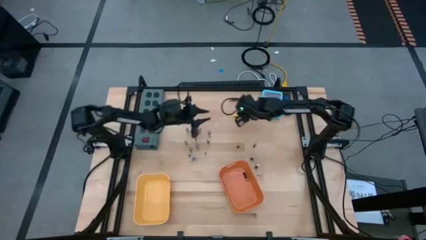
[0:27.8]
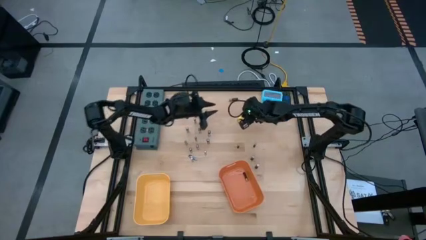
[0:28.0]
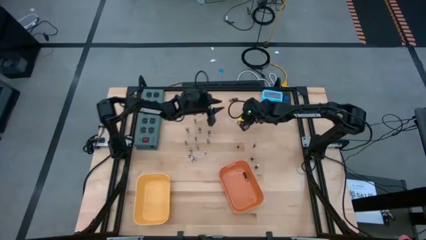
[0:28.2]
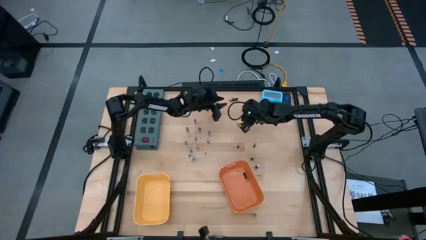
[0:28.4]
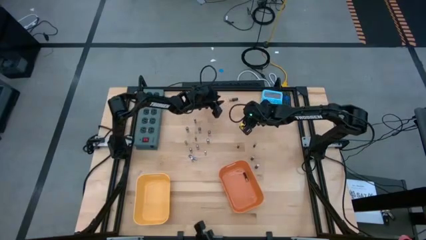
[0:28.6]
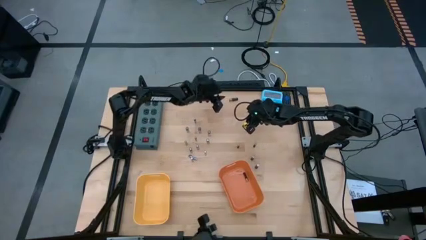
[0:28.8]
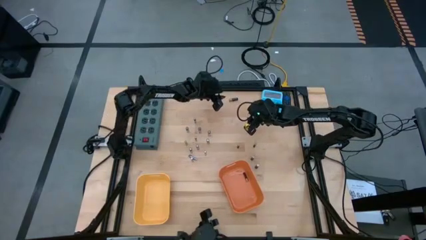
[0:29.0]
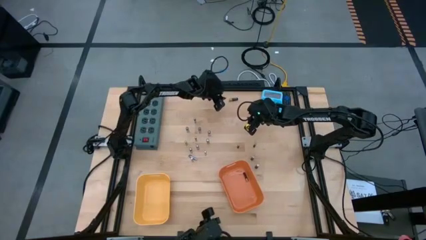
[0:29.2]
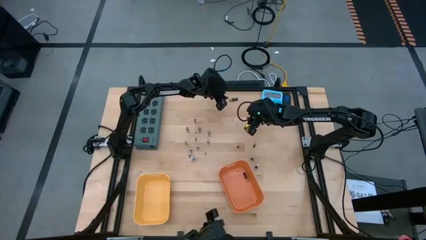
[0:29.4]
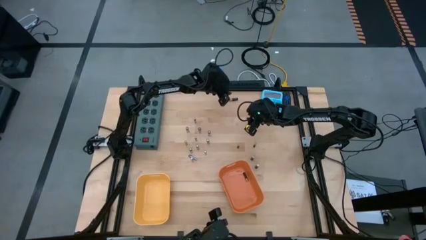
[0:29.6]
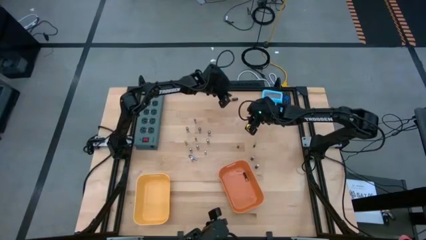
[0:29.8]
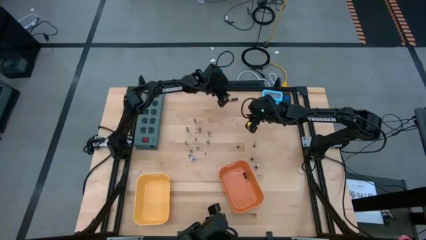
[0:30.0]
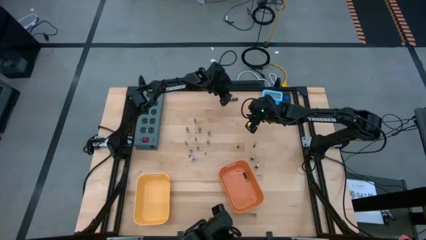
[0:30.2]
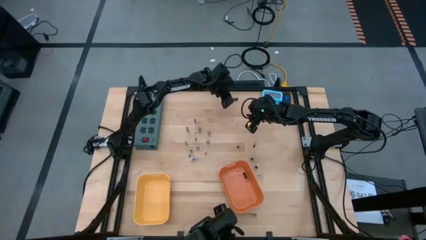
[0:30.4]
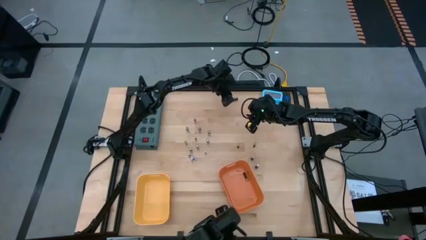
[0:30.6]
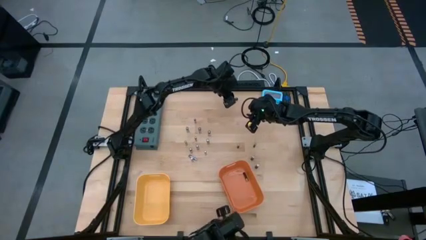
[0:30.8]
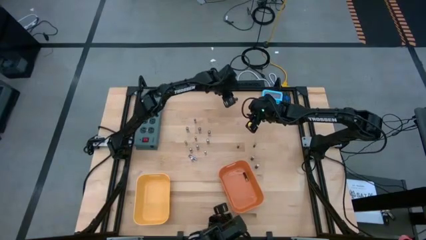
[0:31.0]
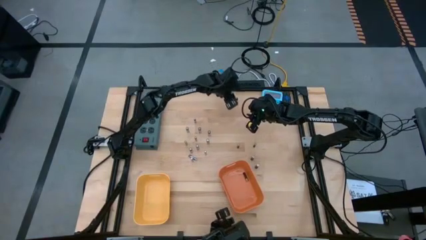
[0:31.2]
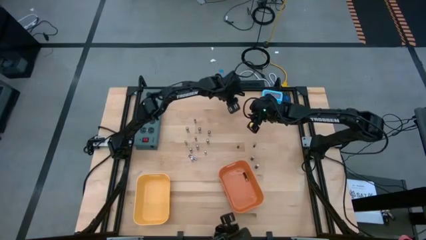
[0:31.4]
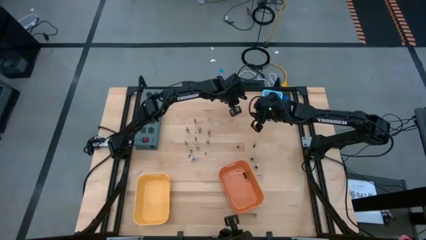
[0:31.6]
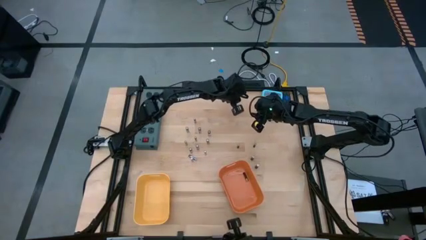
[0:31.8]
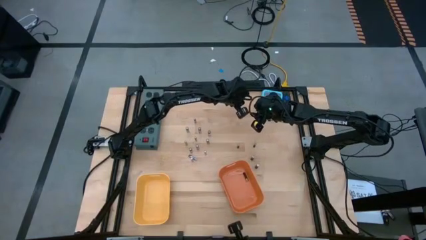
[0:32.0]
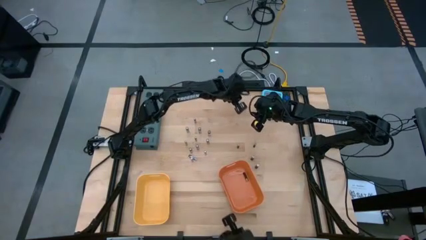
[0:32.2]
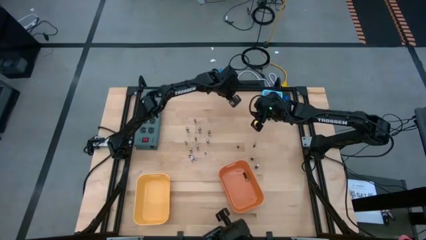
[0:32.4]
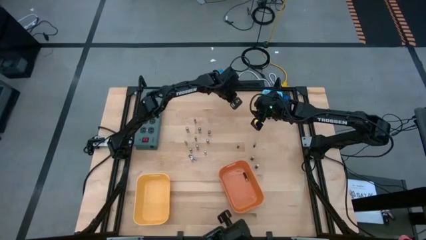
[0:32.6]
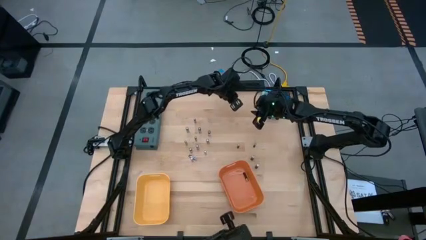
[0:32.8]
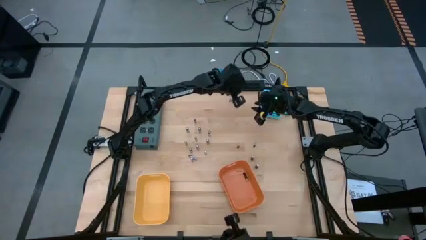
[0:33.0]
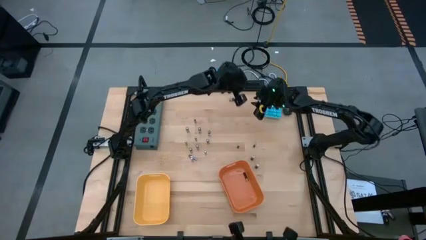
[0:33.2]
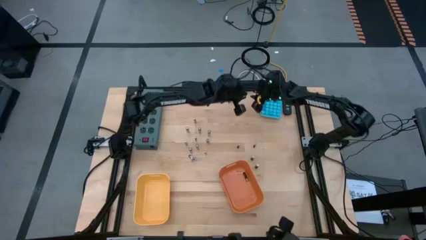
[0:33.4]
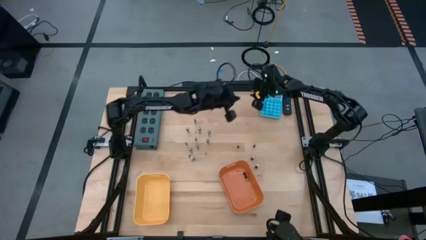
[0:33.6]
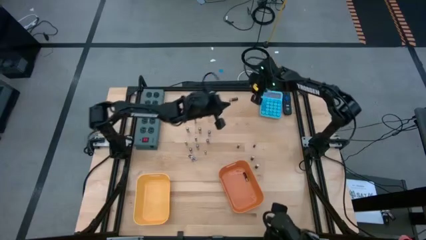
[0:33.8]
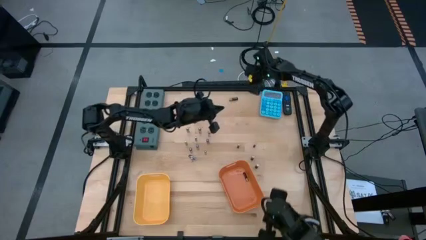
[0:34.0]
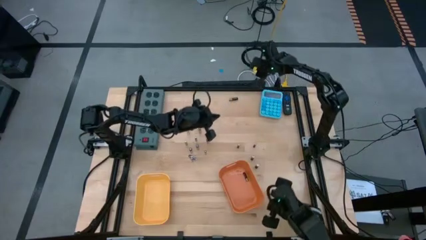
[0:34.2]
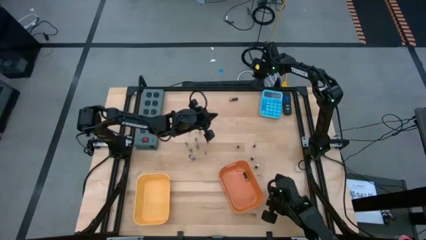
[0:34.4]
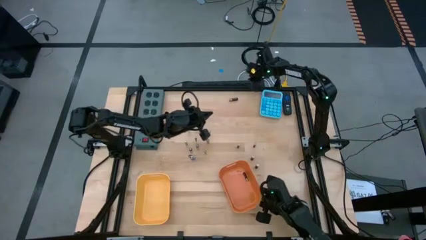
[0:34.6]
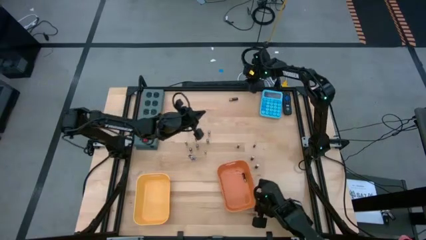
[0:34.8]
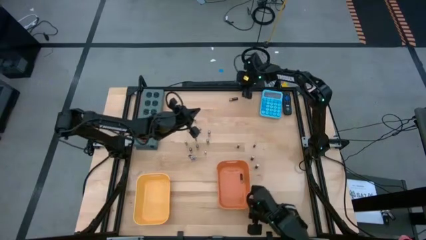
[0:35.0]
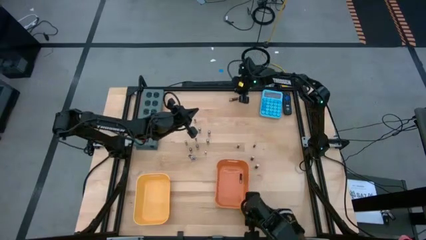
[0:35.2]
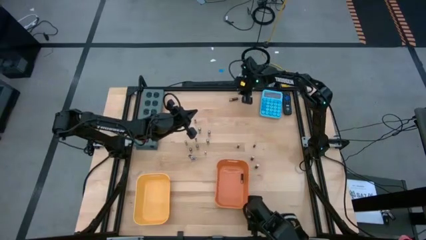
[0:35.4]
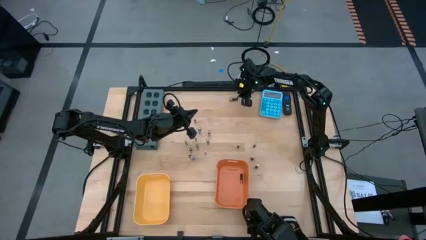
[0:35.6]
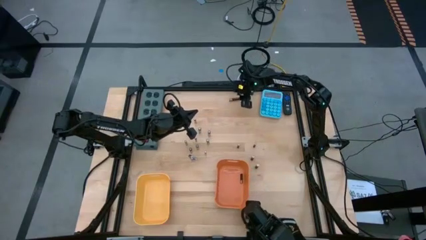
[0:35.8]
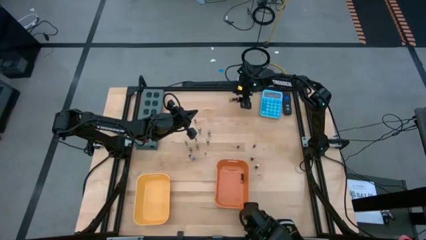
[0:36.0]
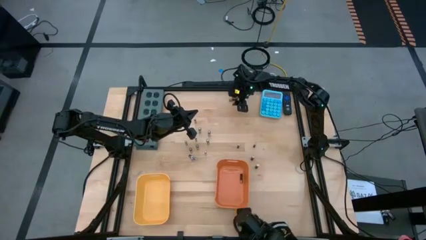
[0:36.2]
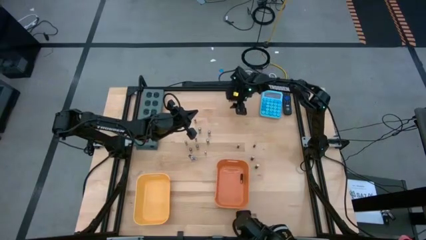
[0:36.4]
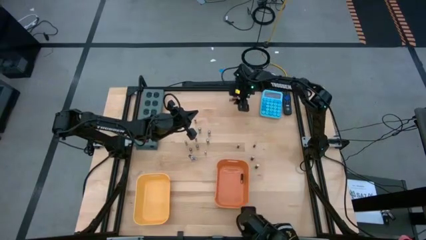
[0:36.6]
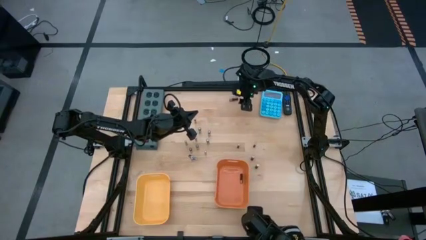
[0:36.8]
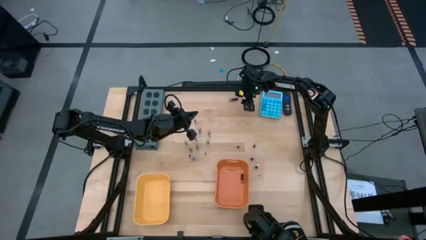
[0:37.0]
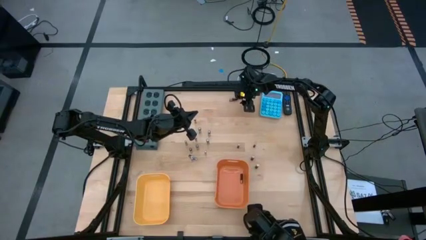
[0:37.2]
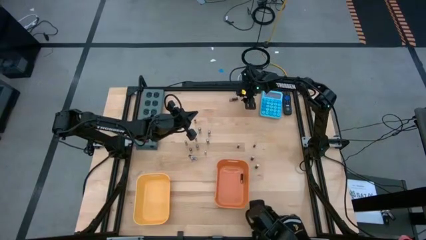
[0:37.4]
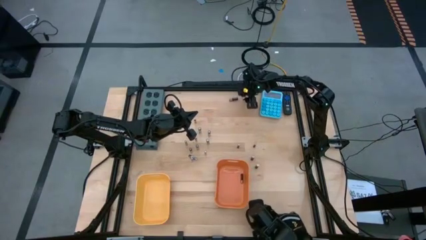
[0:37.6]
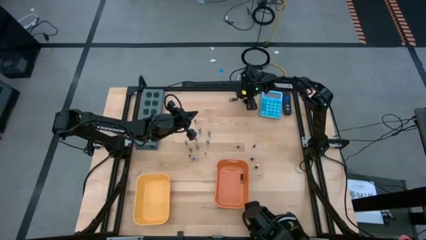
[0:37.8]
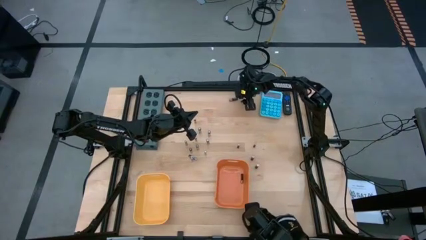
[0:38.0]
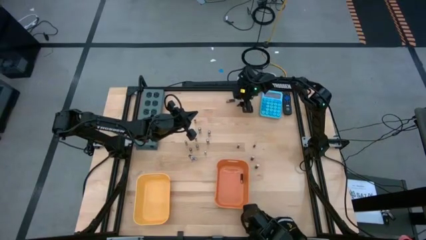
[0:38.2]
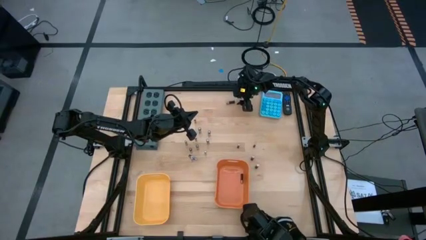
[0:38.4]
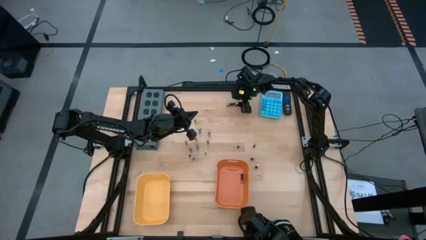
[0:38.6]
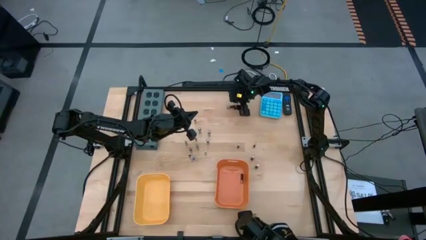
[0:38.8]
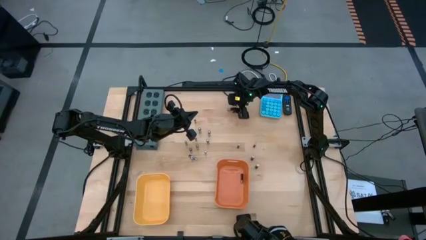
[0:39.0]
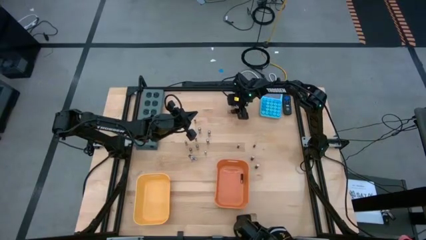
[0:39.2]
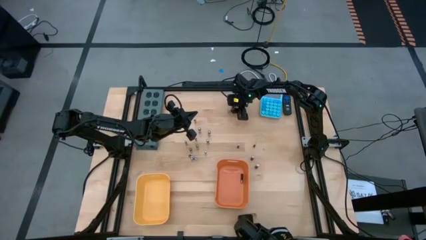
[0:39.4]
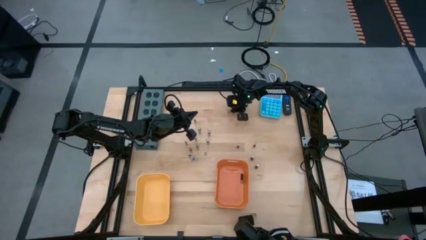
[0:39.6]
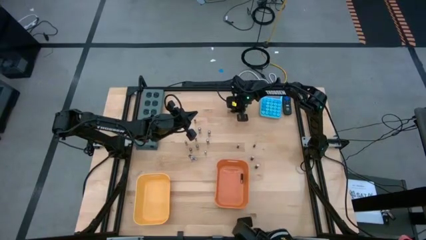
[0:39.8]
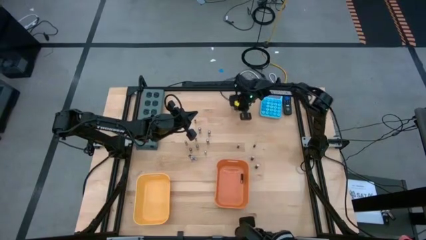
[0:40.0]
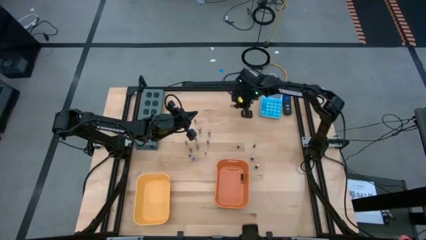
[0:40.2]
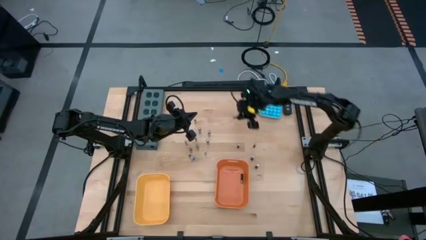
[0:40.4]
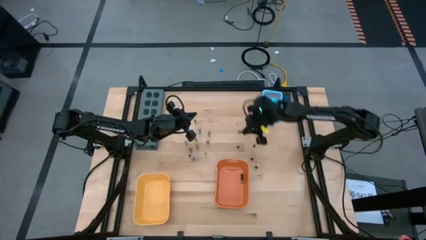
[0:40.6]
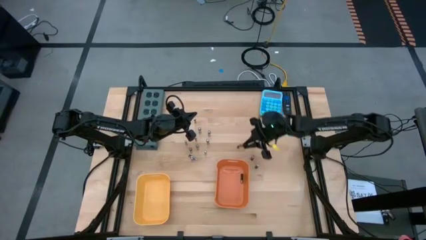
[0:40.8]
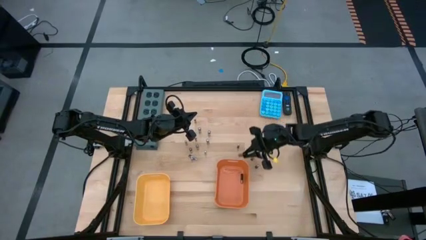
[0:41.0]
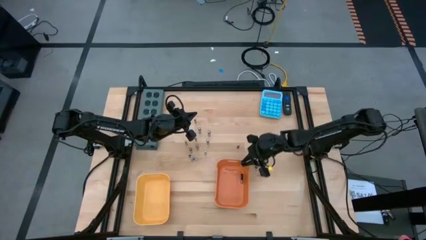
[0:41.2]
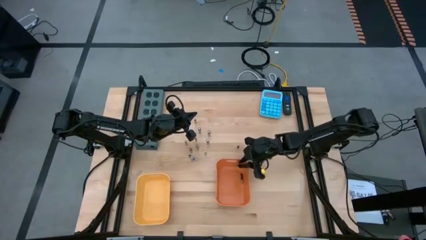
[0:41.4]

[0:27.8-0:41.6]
Task: Sort batteries
Put the brown battery into the orange bin

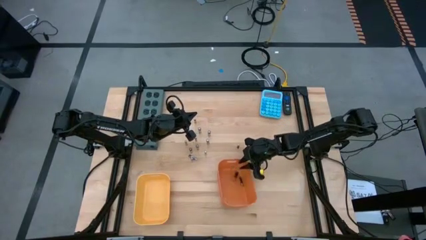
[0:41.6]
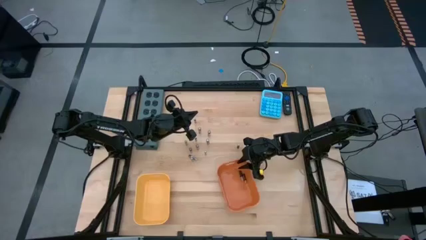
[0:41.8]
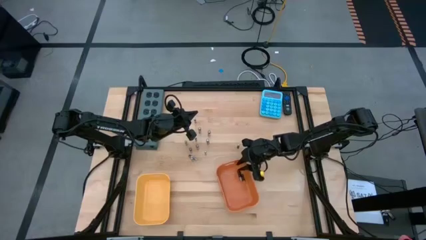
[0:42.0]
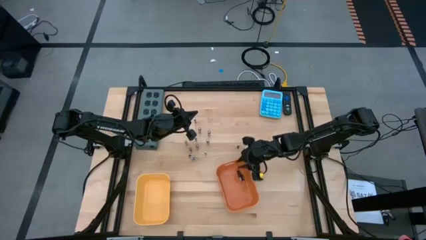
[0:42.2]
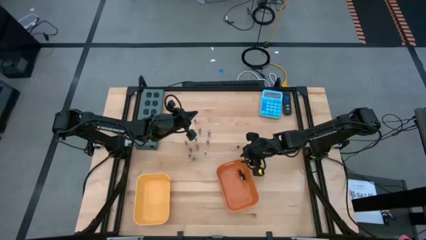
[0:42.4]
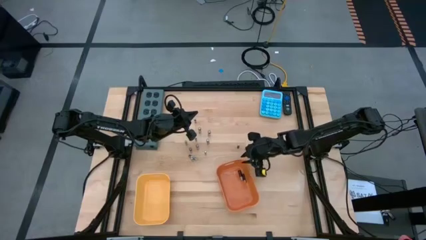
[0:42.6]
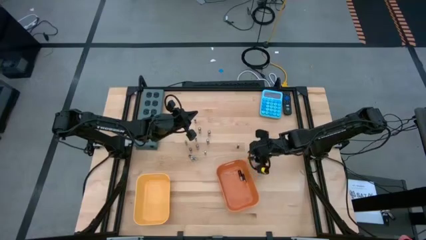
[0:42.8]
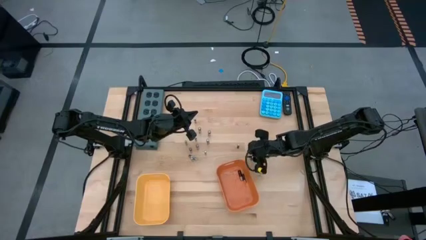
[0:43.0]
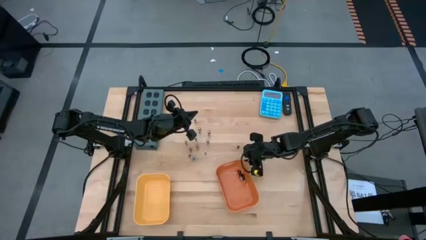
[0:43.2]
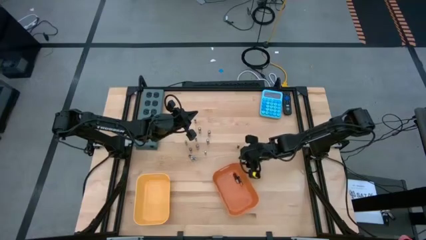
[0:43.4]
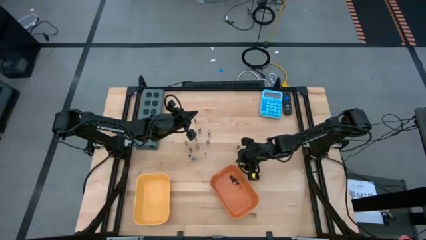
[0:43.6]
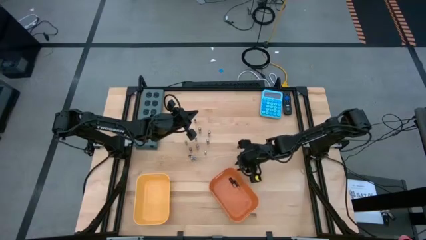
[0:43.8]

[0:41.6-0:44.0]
Adjust the orange bin
